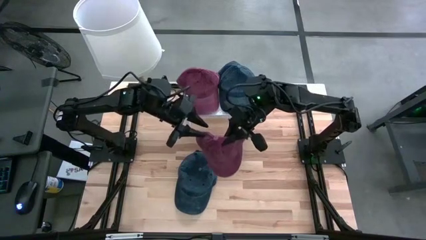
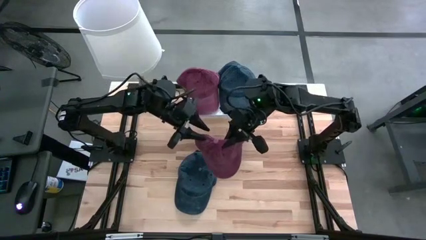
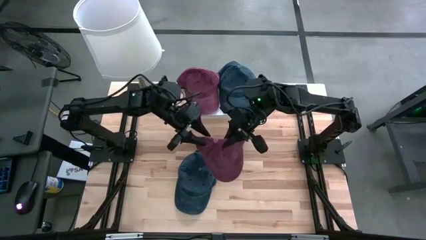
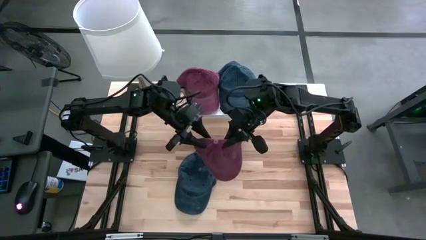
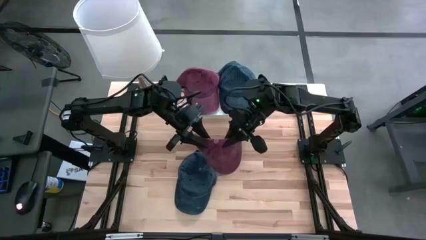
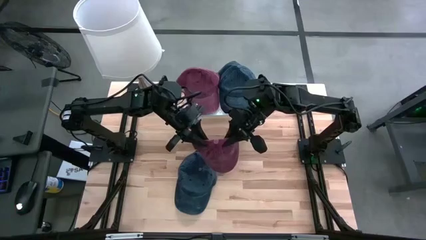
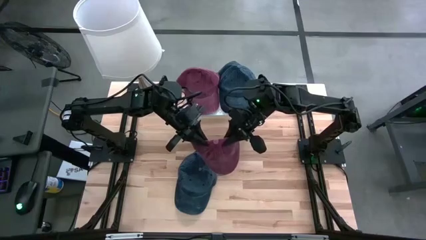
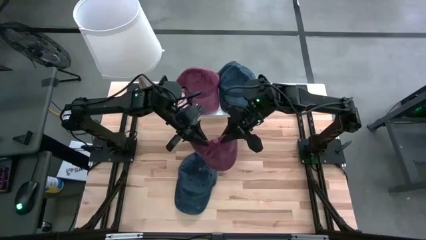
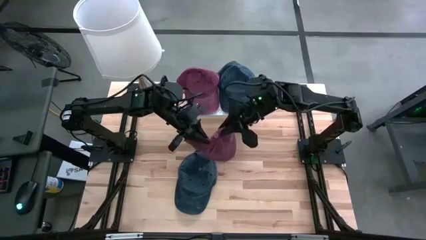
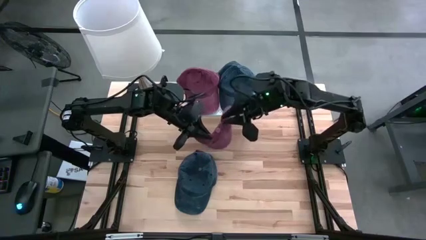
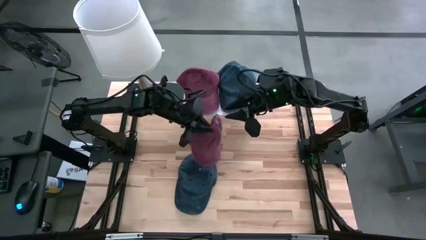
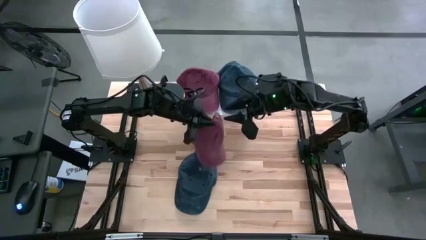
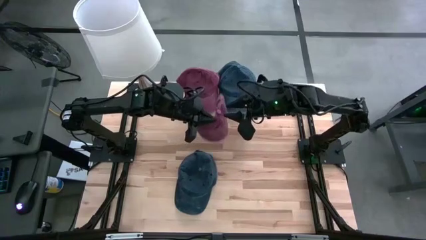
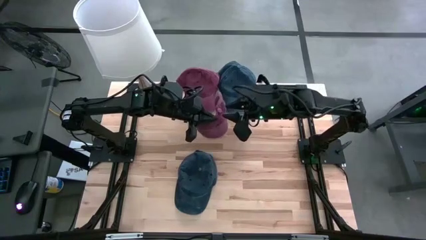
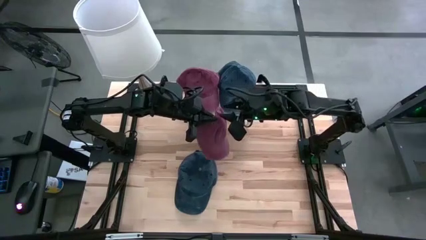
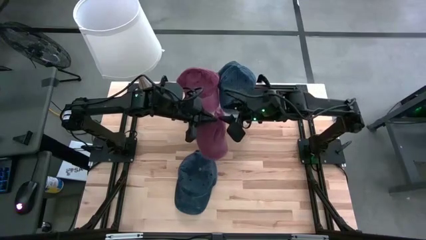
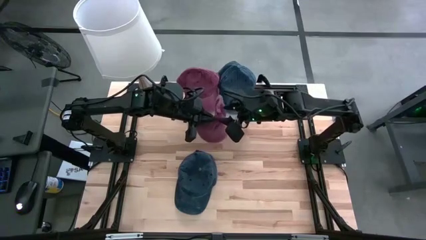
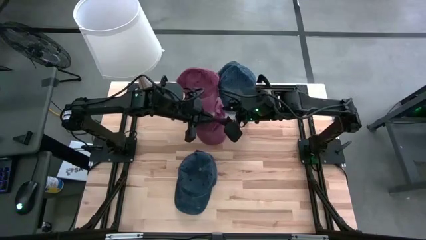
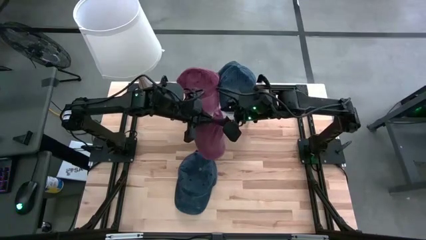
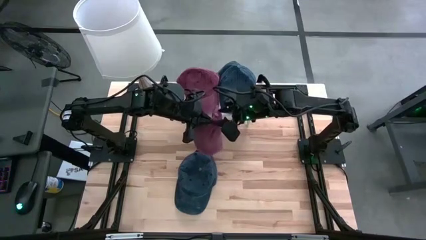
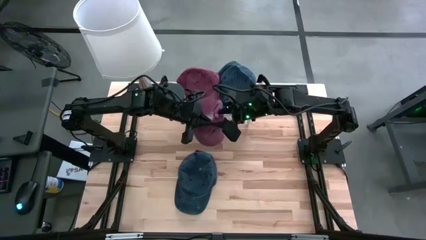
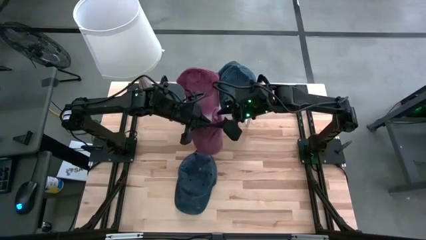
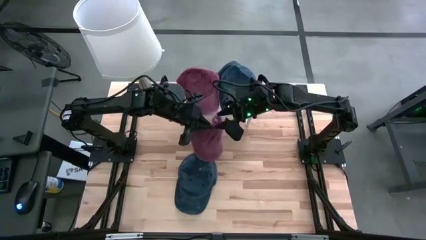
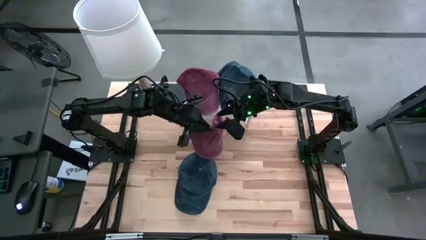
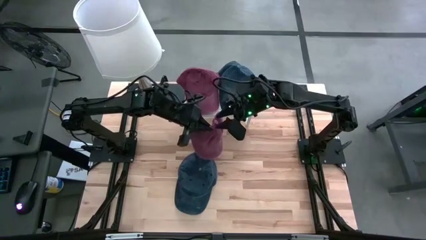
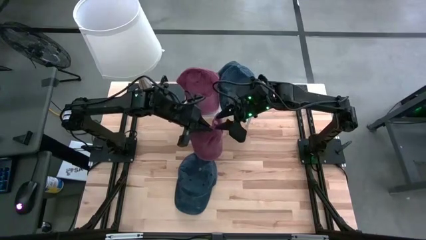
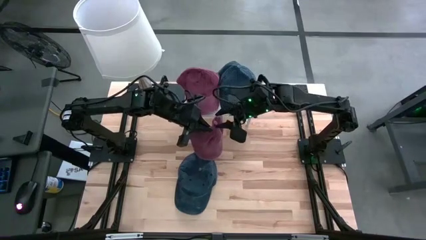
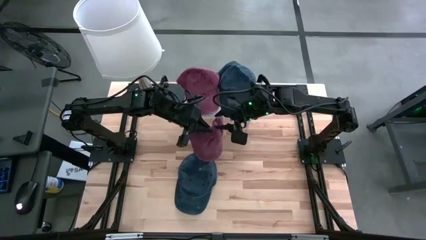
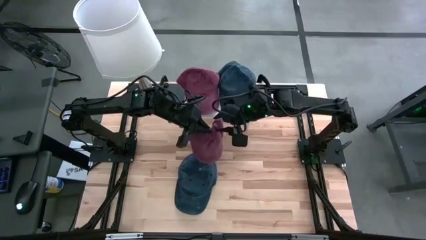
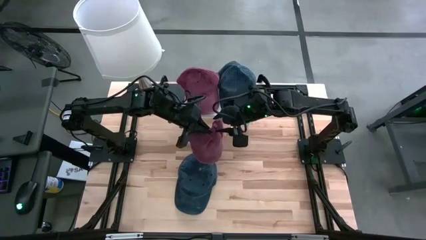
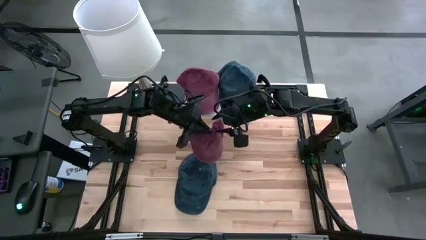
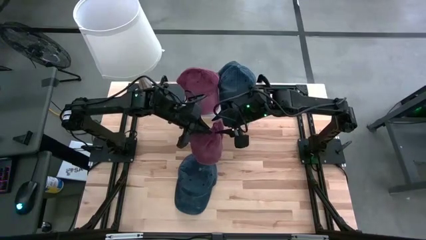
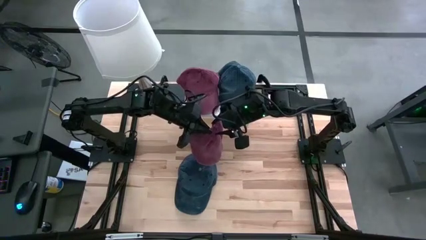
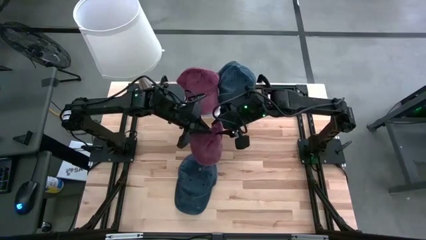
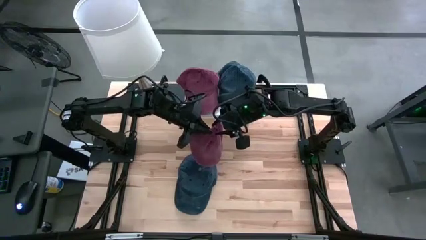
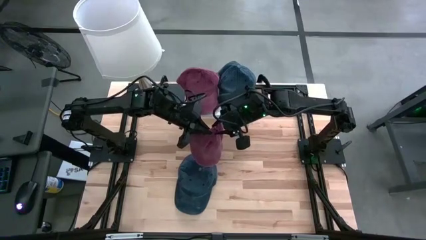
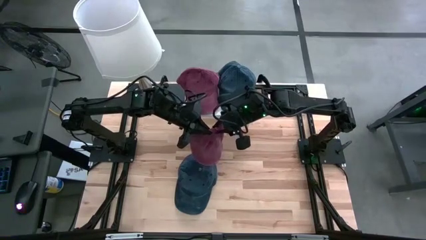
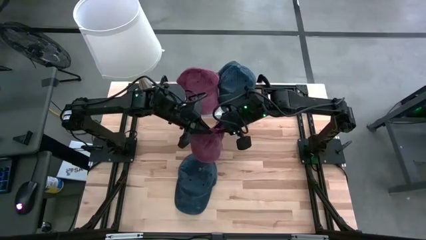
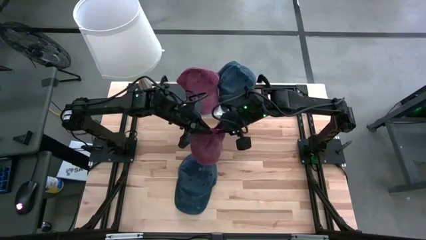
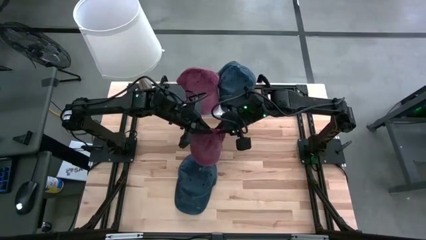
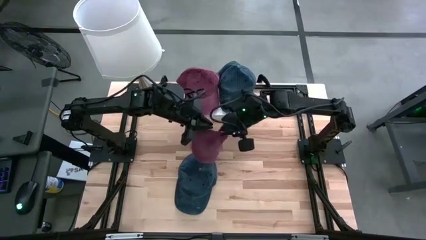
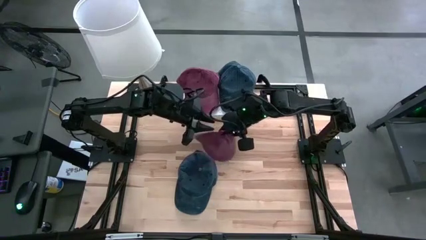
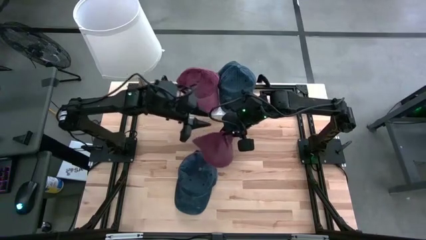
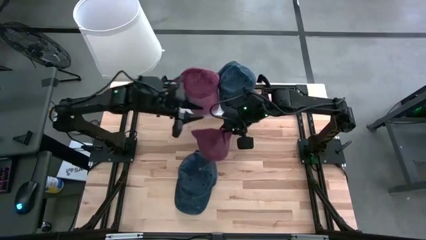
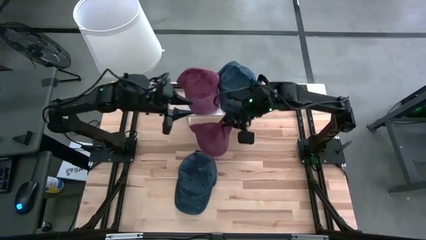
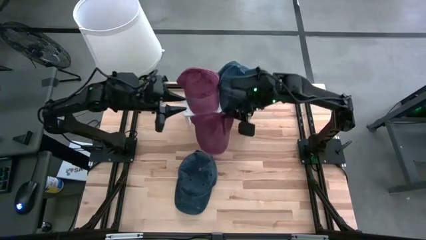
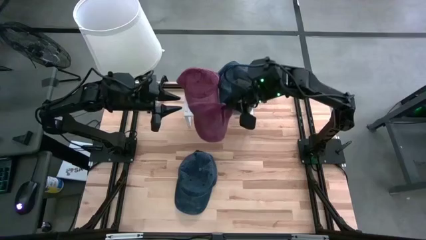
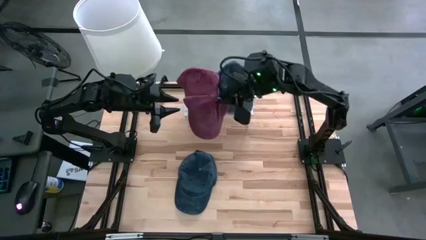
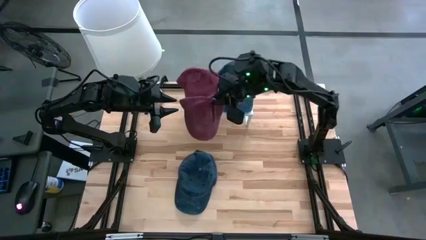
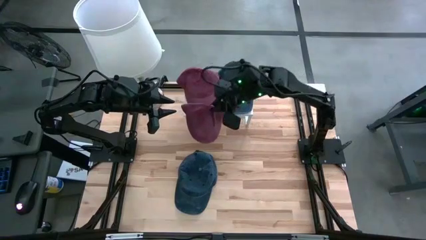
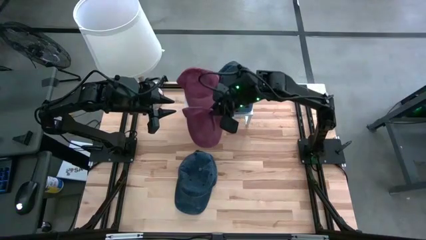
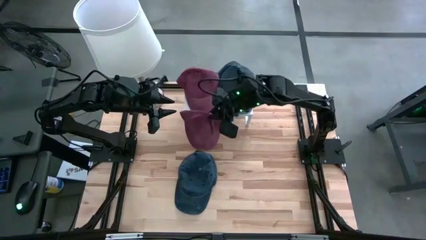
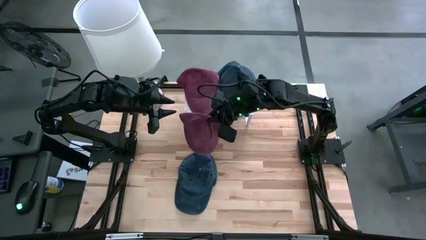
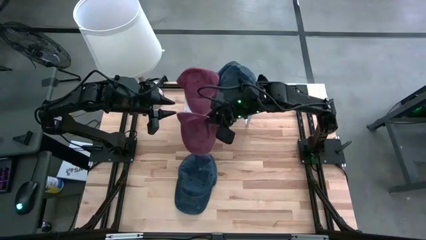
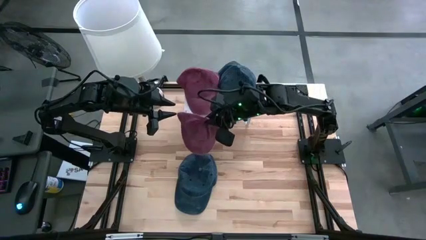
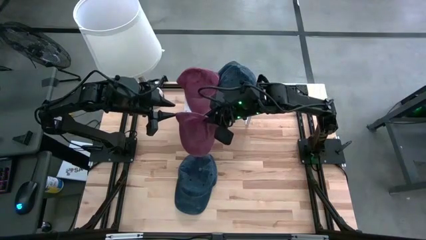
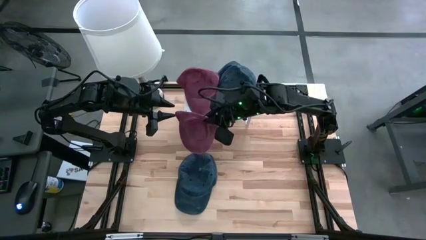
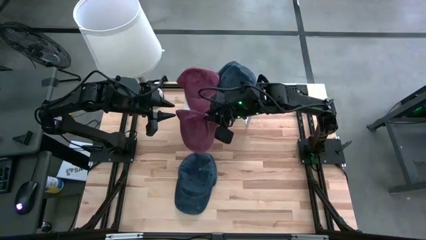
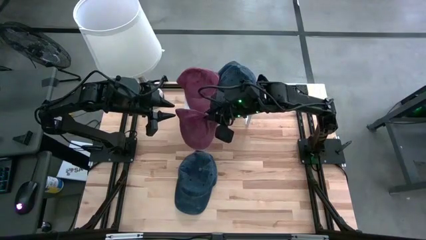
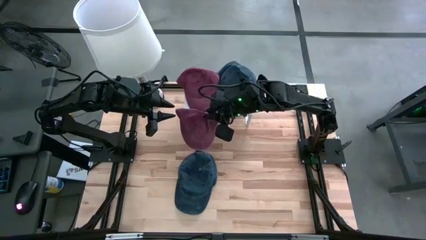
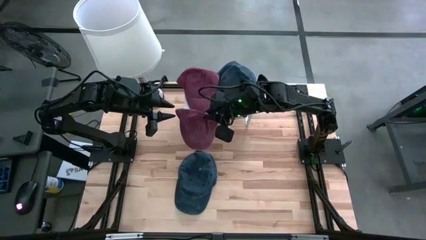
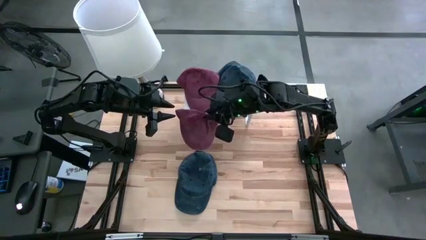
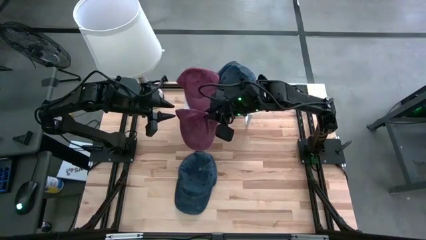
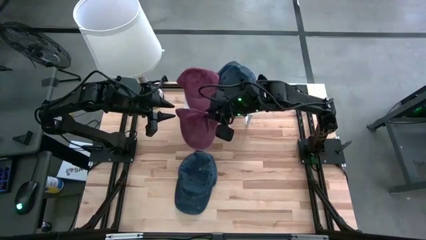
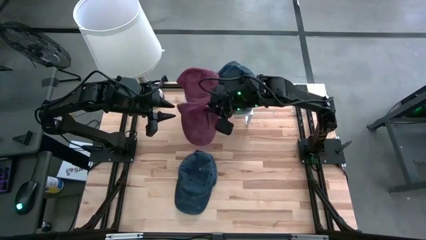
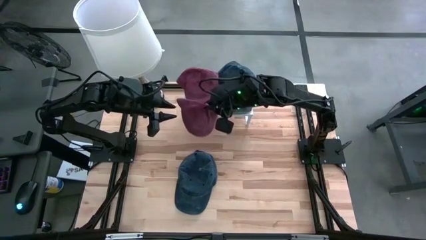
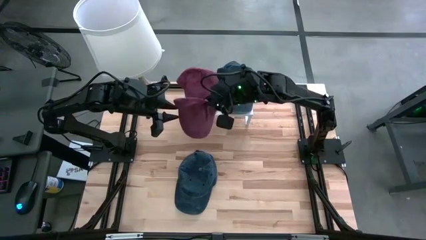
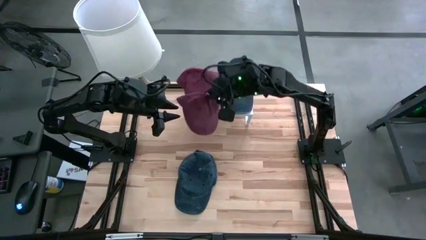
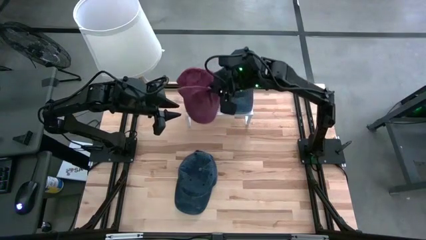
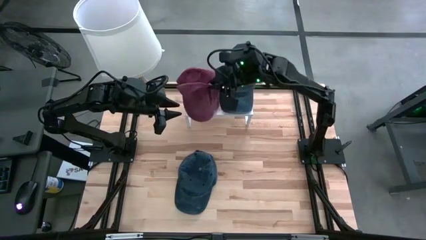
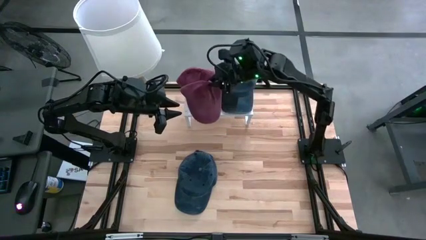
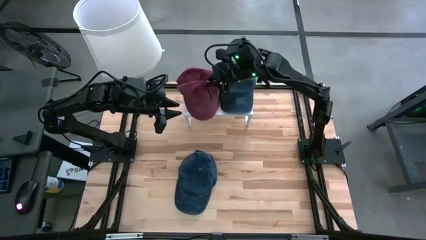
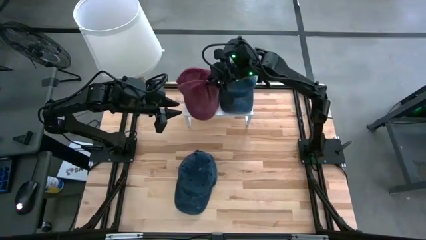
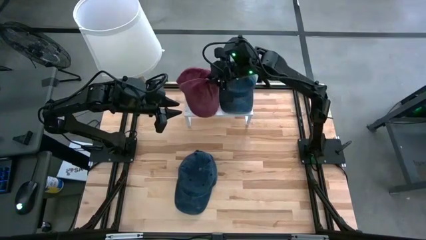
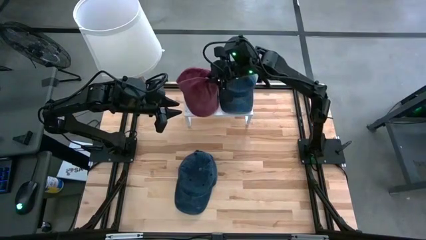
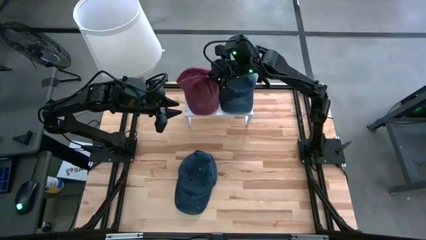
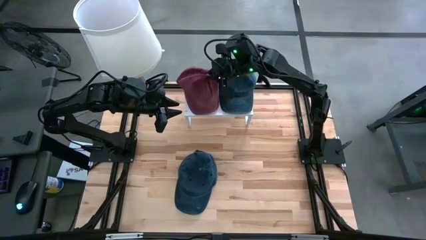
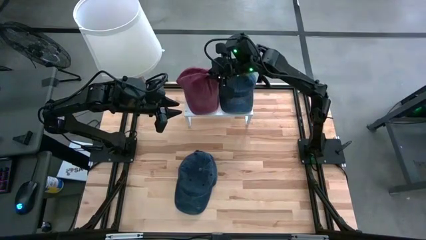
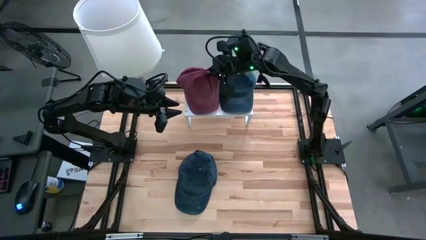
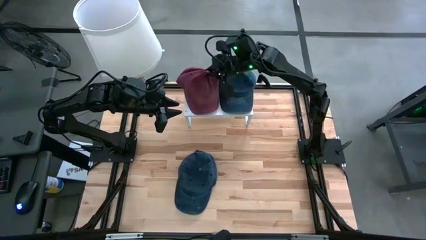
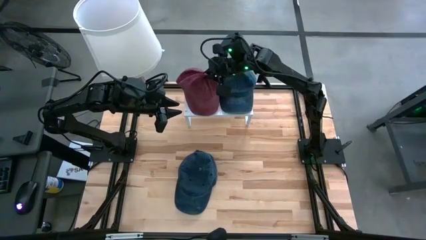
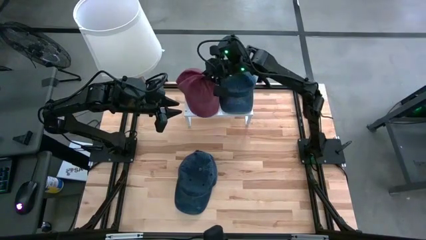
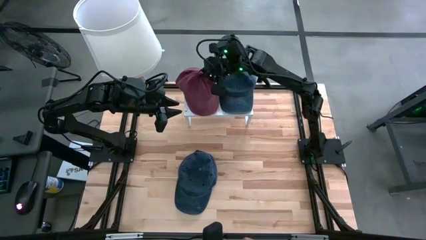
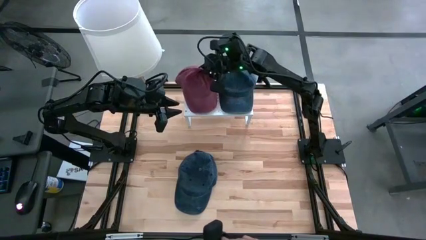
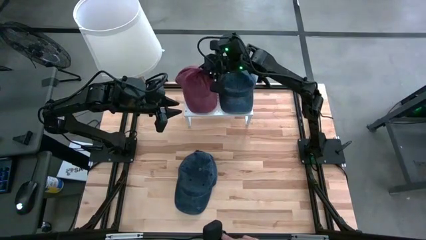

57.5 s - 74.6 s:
Task: Pick & Place hat
Stack the red cap on top of the red cap on the shelf
